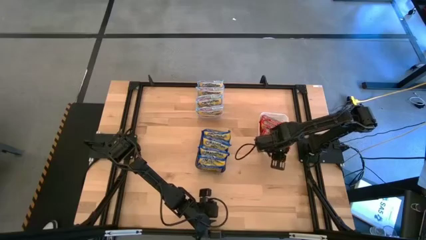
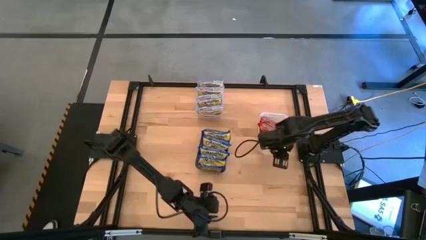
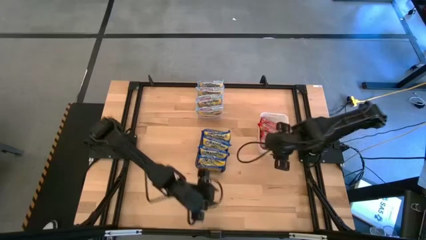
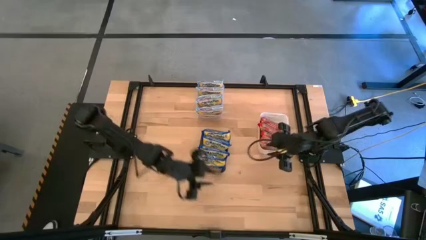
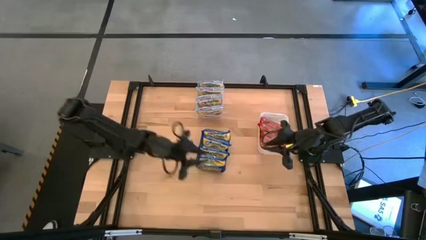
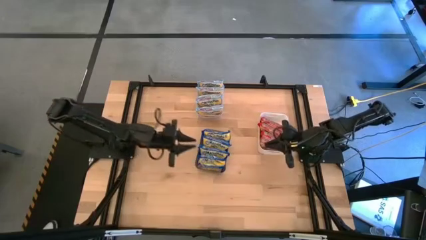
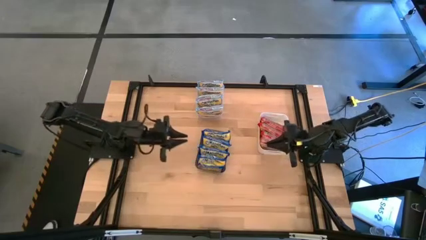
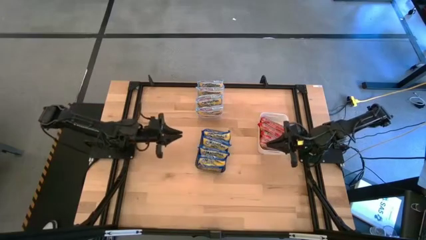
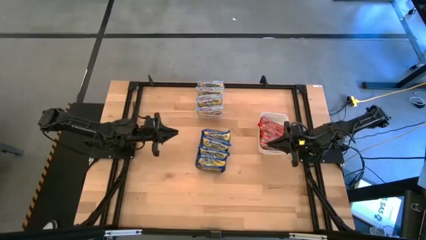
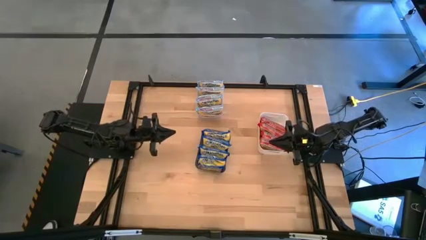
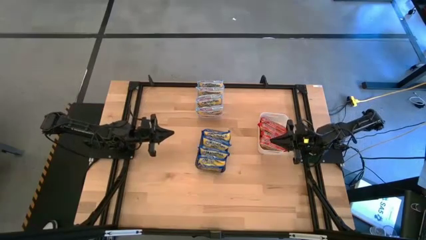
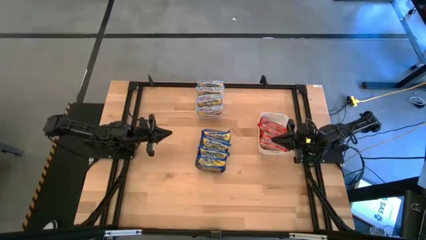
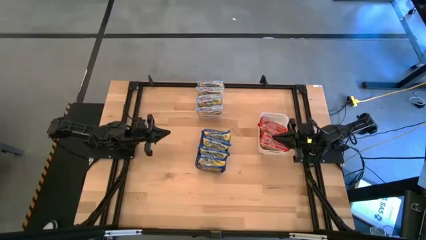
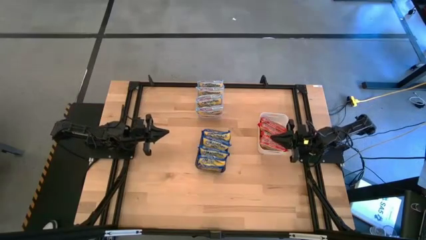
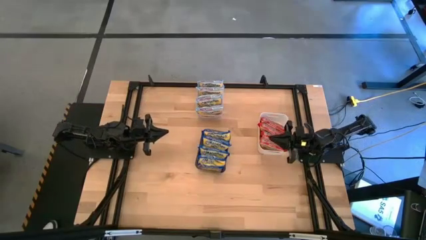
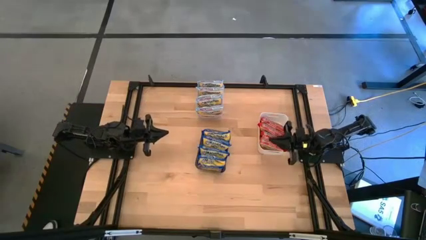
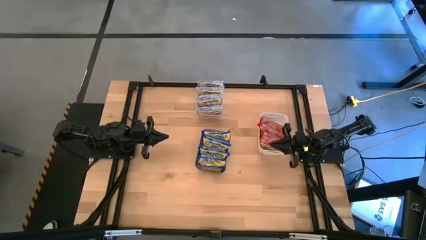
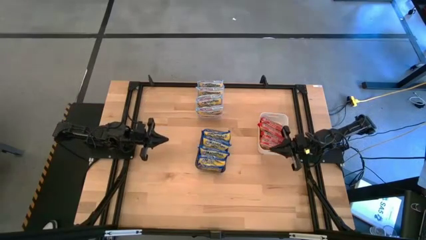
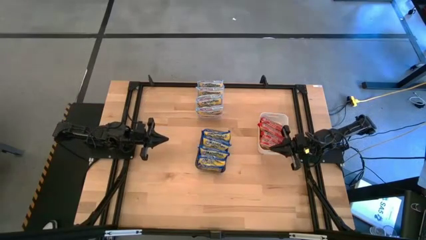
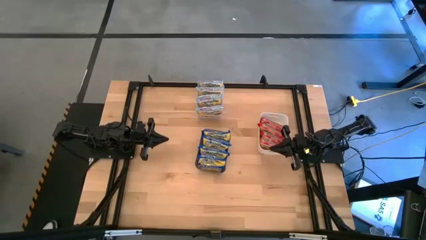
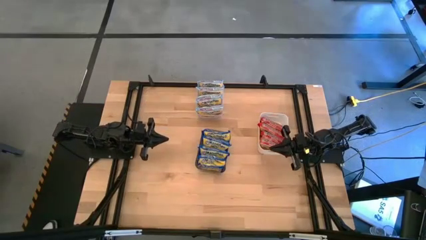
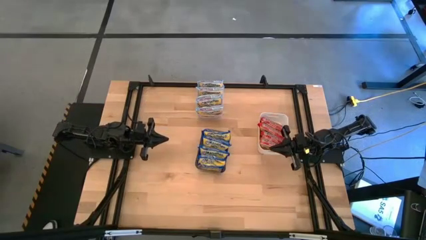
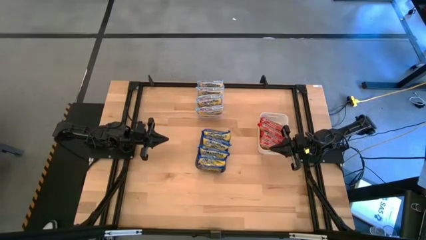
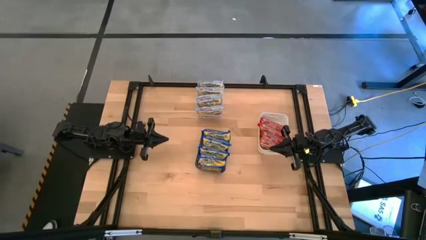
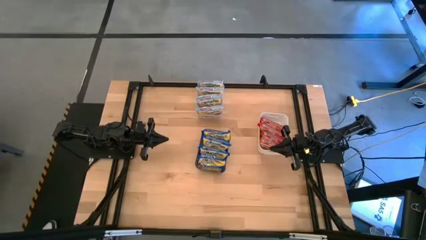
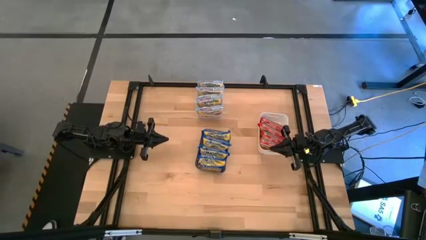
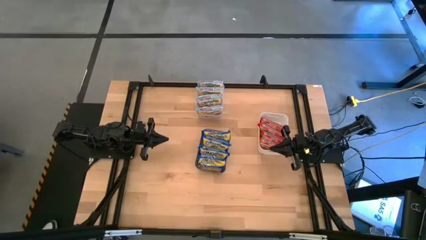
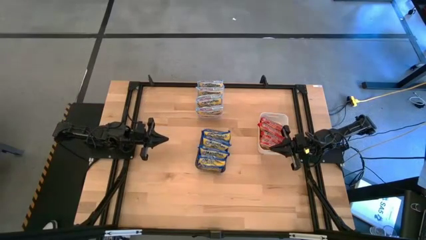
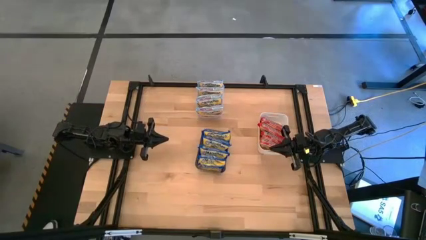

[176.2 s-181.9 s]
Task: Sort Maruchan noodles
Return to Home Position

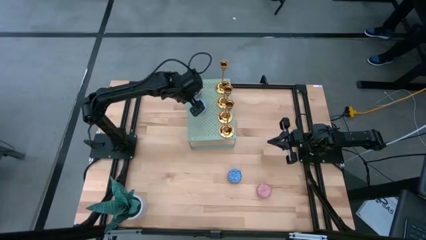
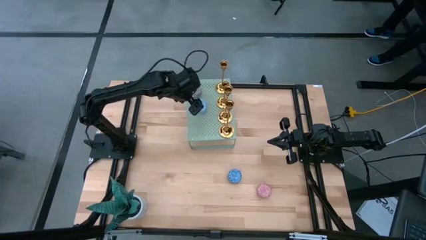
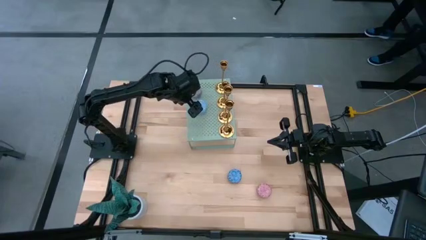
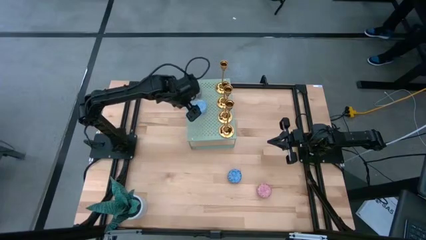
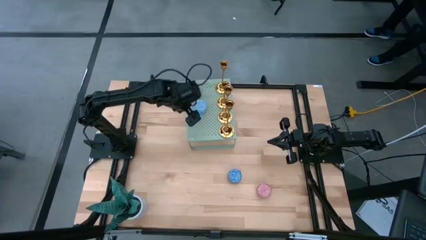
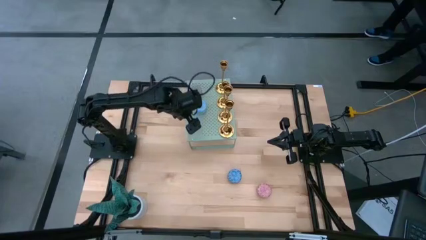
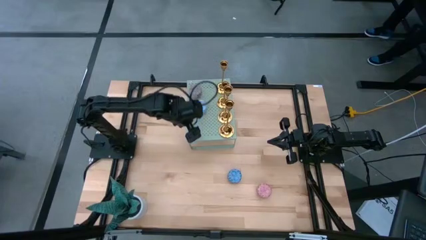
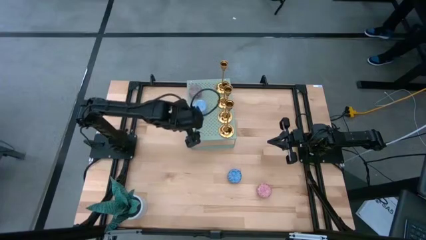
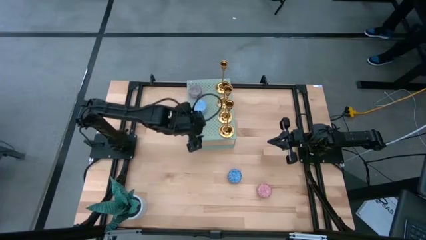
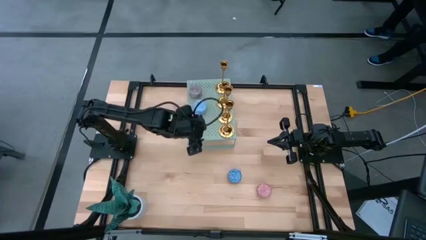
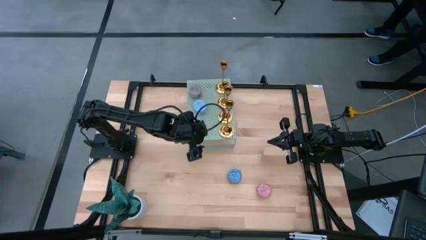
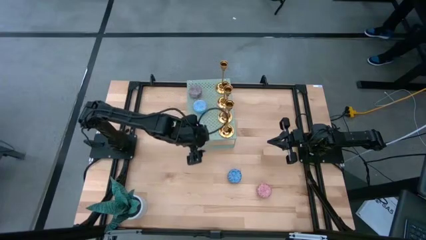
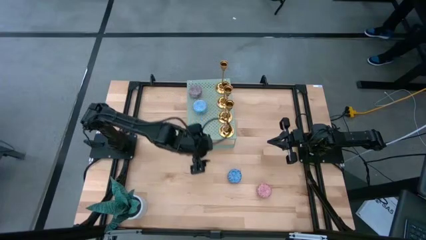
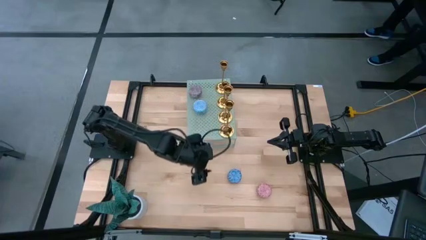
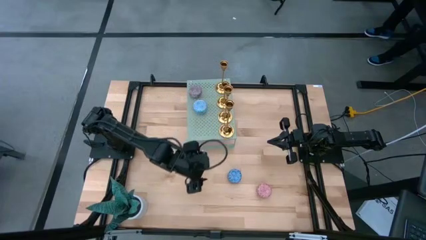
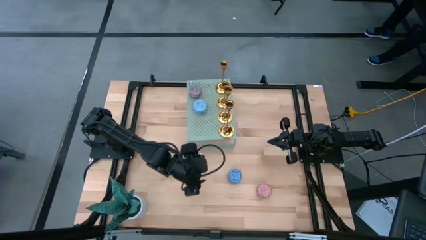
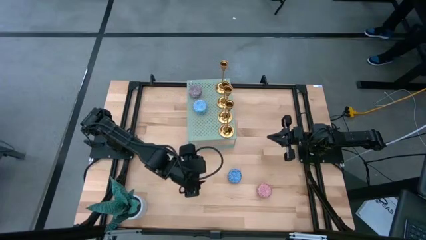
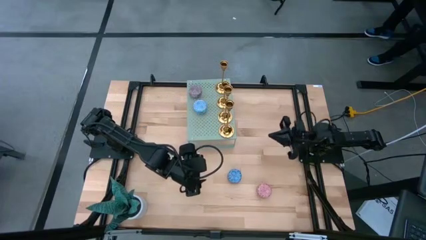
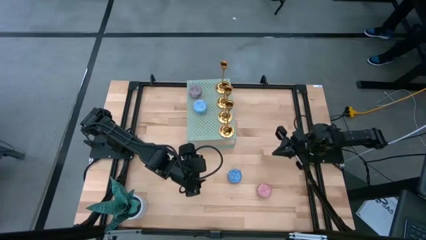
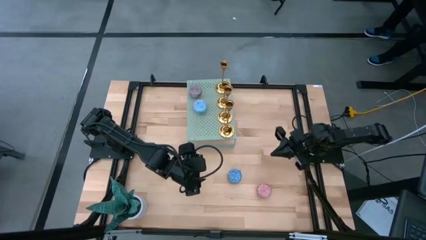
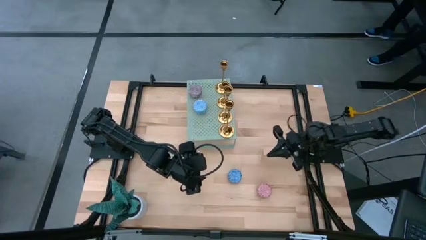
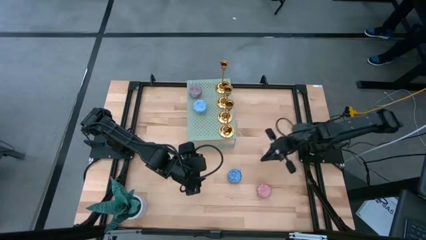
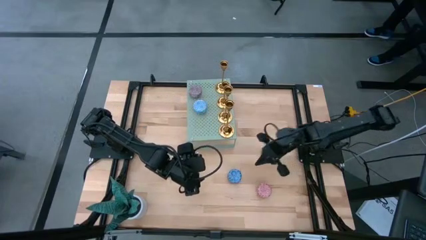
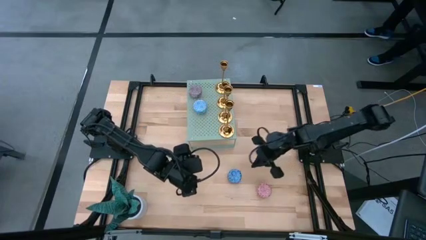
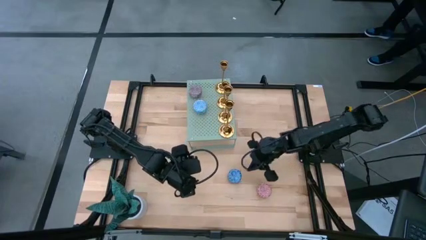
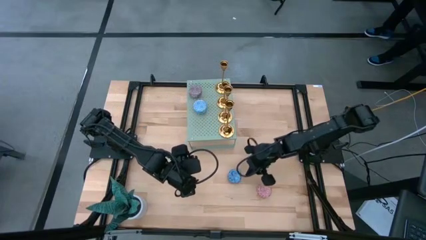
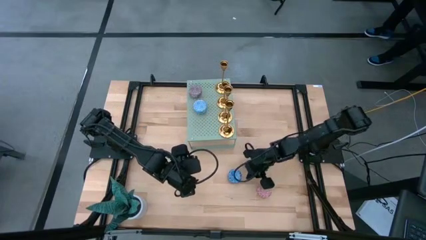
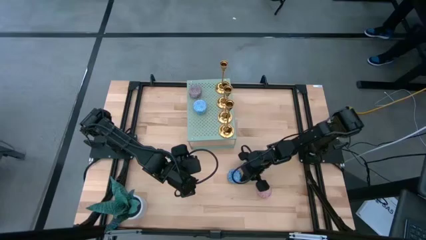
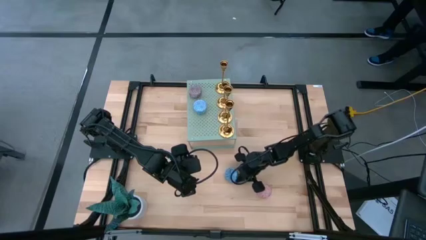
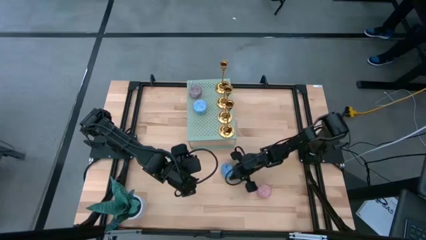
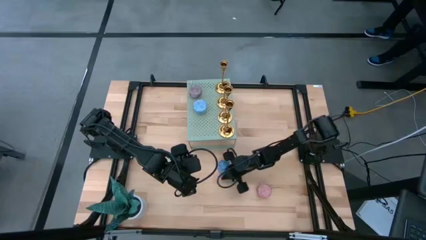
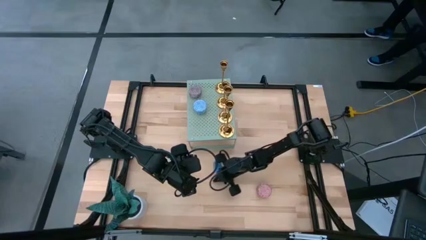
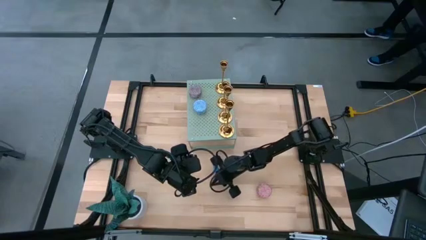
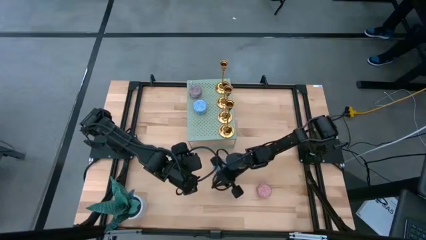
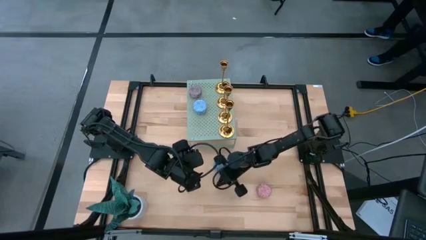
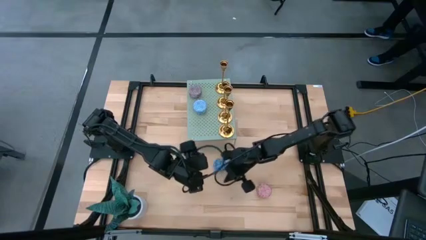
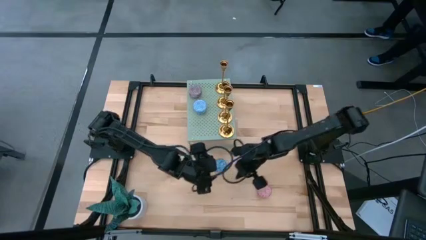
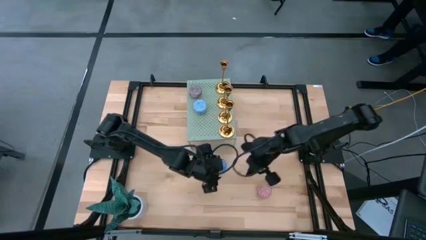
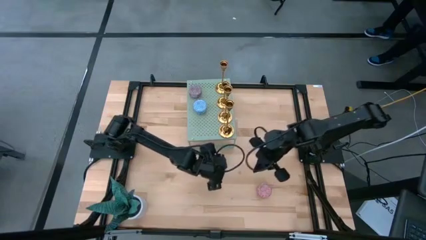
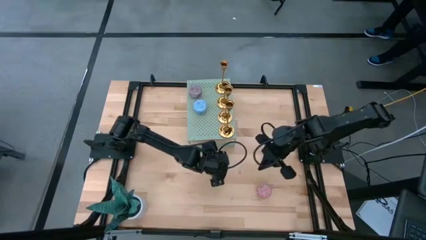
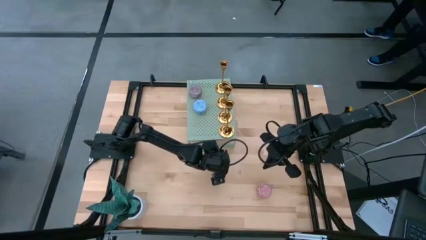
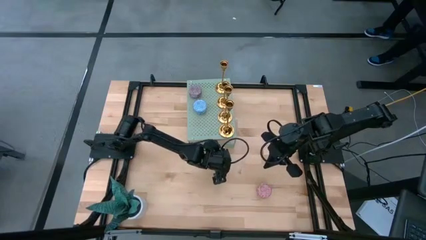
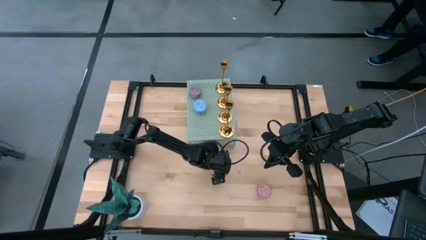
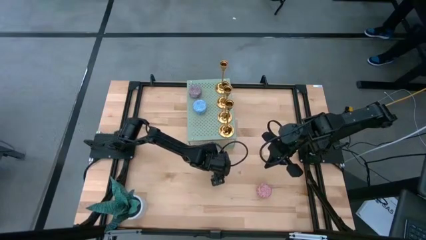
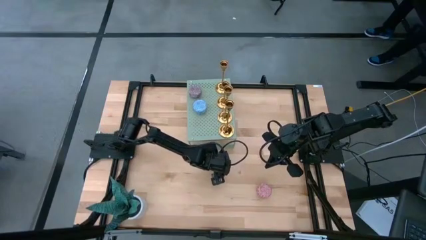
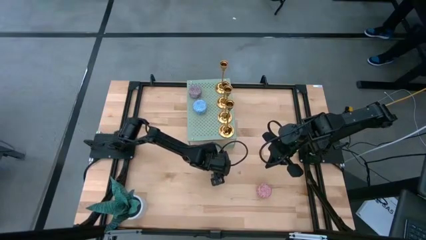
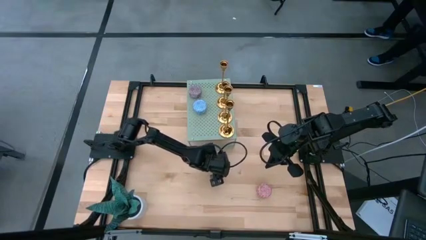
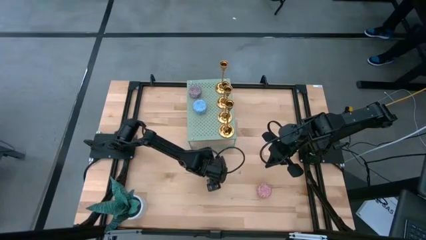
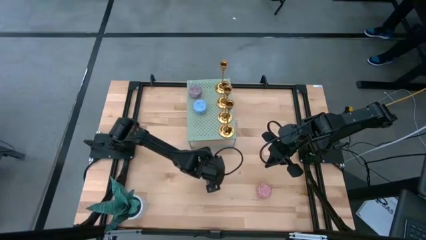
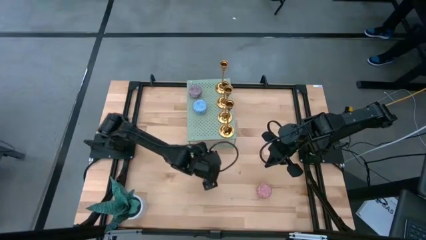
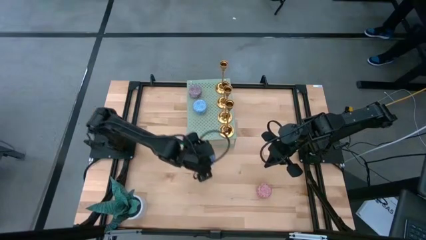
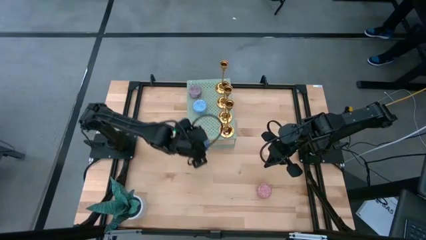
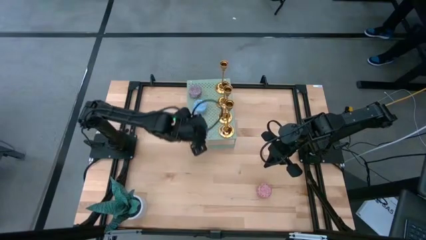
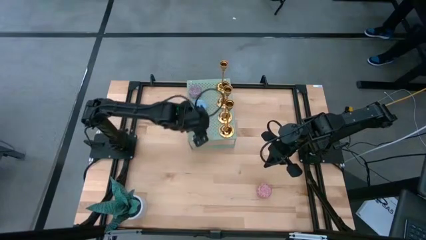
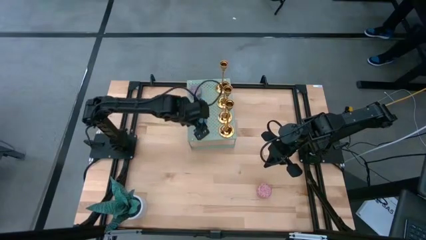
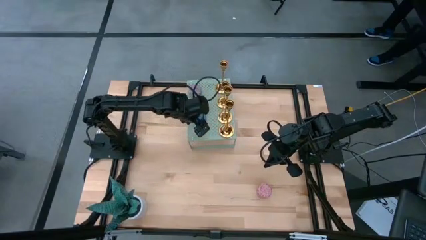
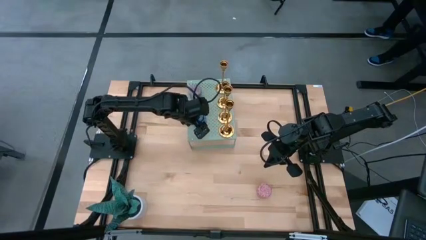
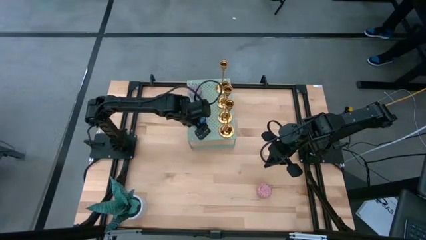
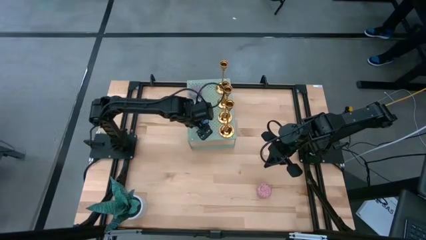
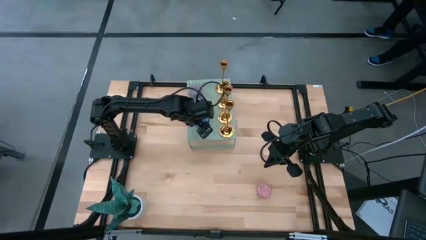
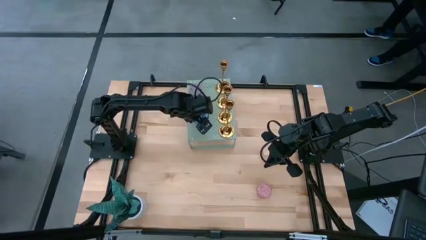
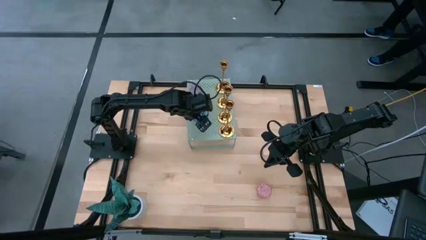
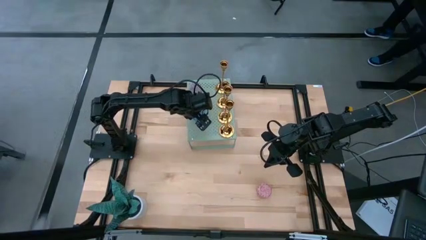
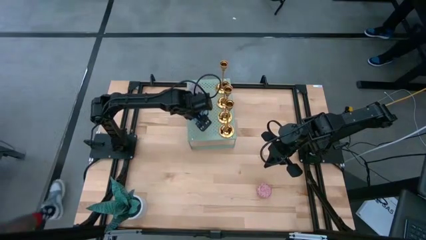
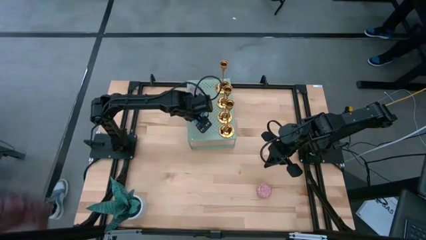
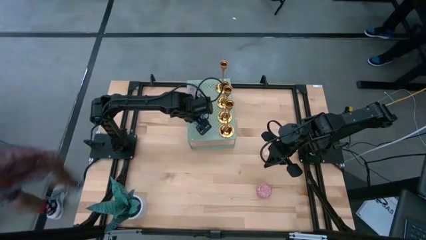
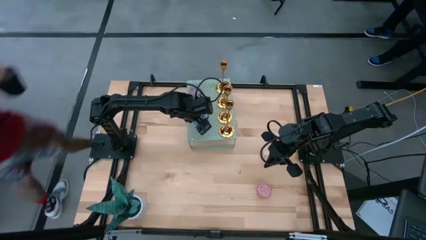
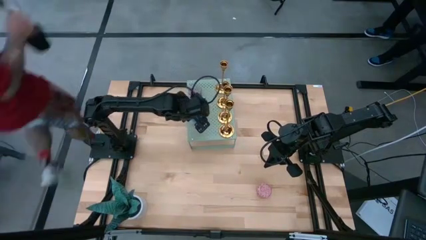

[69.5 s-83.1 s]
Task: Pick & Place candle stick holders
Align the blue scented candle with the other scented candles on the shelf
